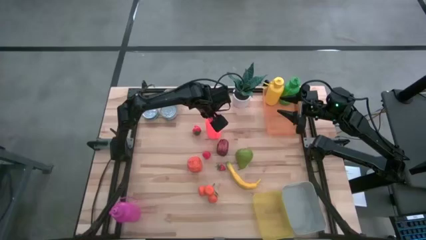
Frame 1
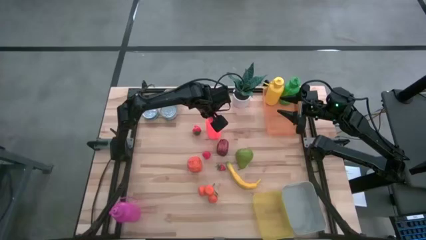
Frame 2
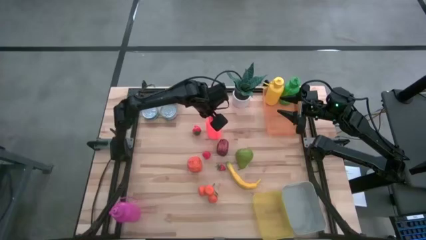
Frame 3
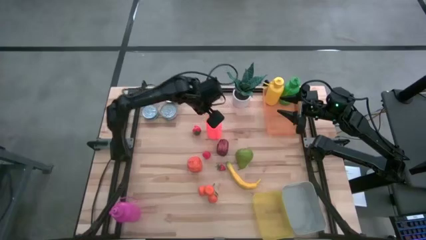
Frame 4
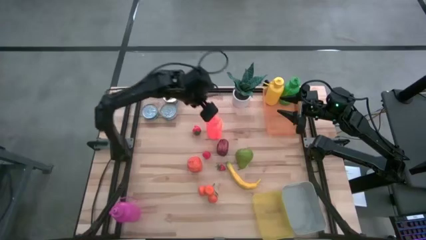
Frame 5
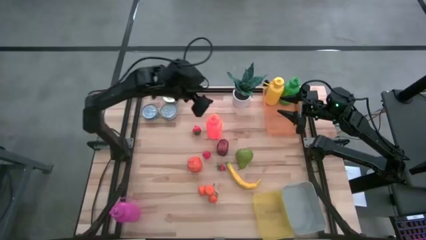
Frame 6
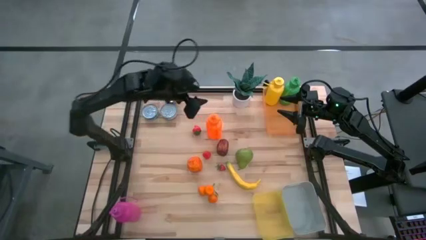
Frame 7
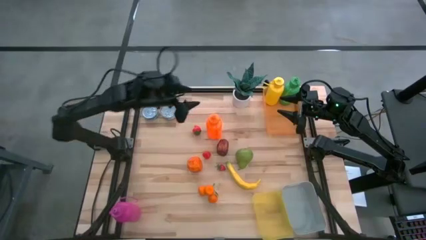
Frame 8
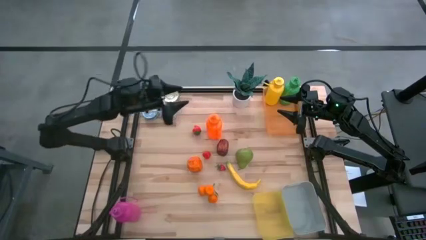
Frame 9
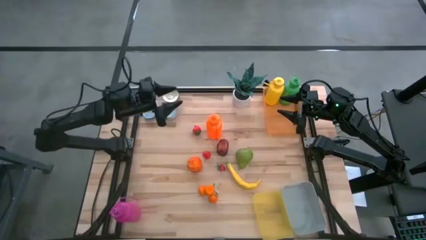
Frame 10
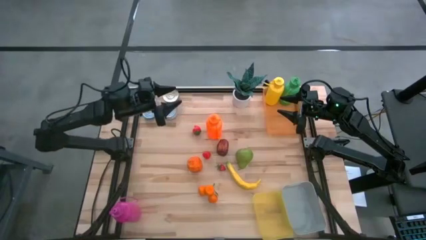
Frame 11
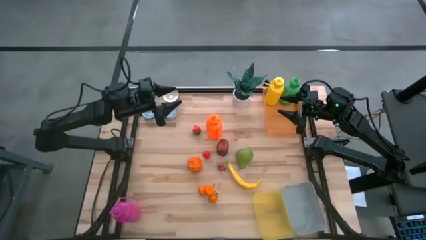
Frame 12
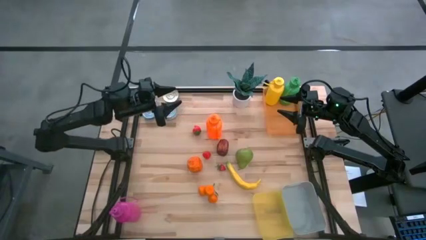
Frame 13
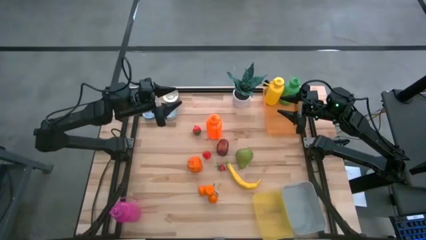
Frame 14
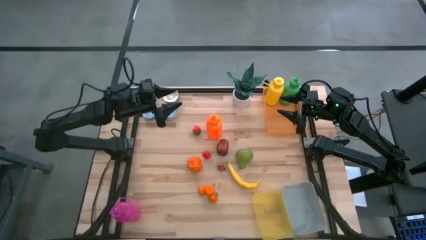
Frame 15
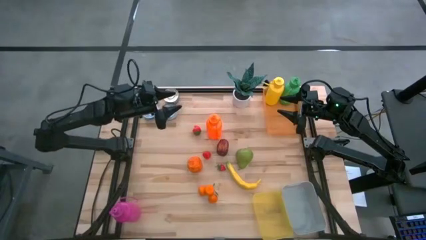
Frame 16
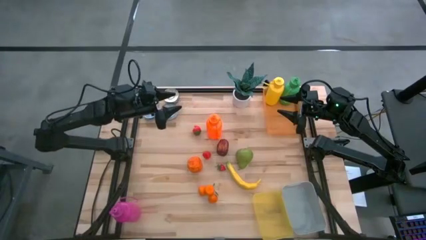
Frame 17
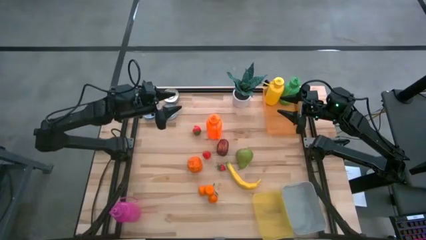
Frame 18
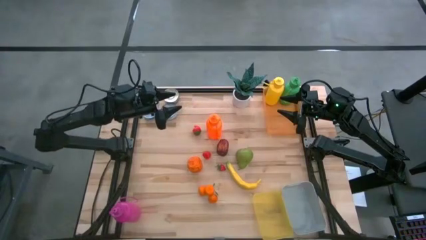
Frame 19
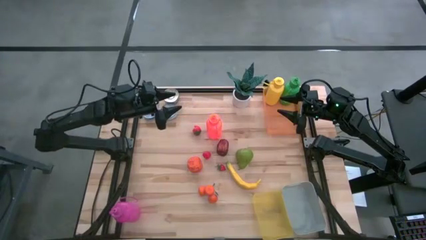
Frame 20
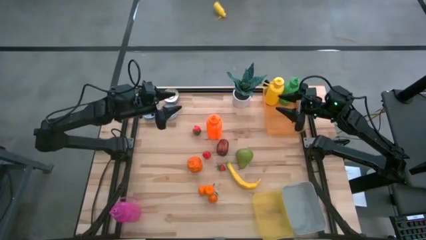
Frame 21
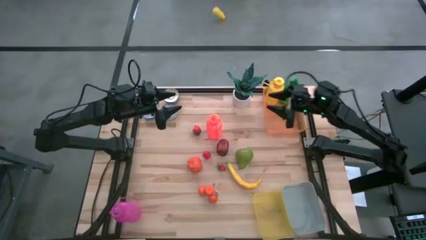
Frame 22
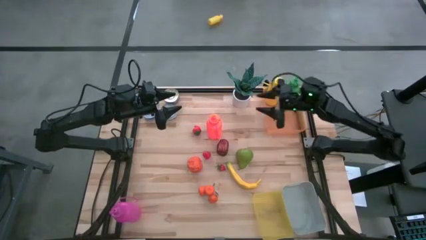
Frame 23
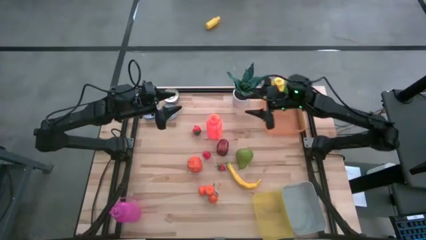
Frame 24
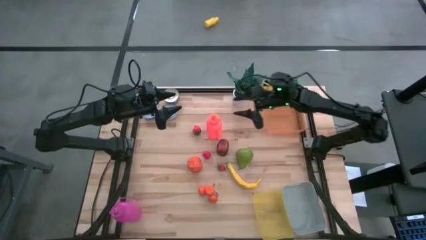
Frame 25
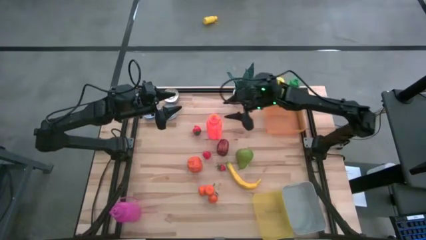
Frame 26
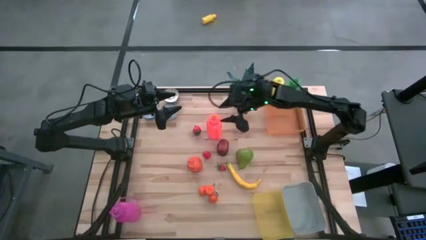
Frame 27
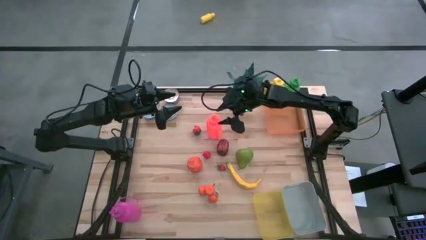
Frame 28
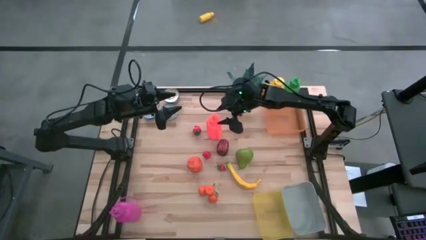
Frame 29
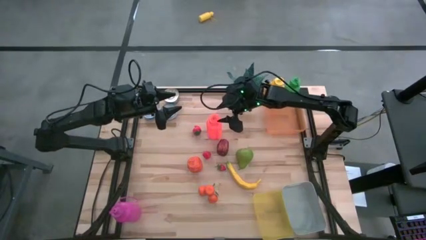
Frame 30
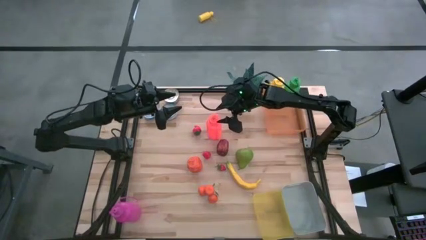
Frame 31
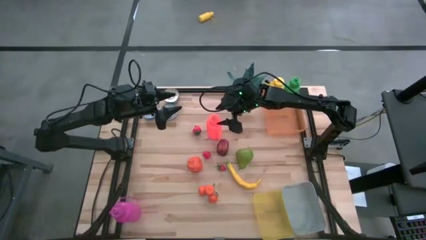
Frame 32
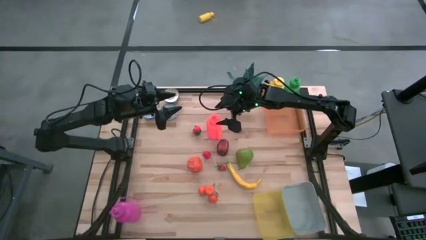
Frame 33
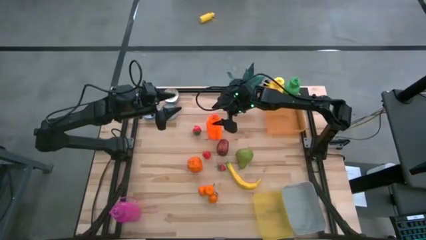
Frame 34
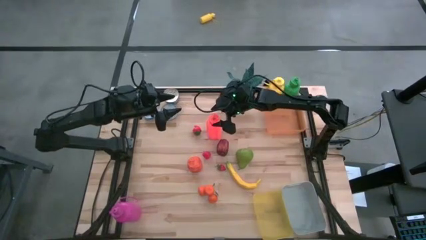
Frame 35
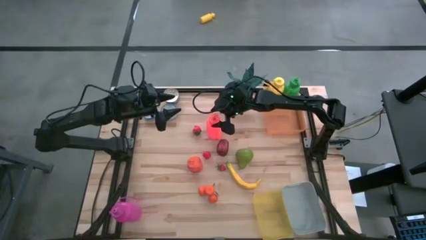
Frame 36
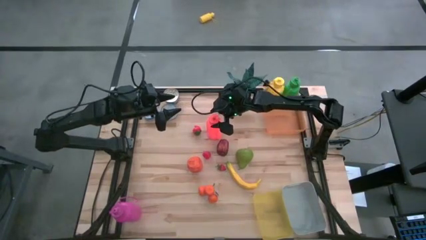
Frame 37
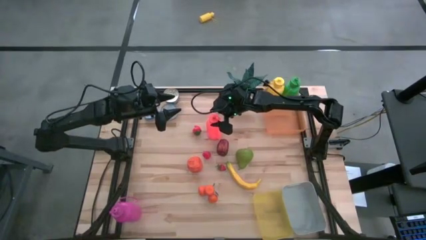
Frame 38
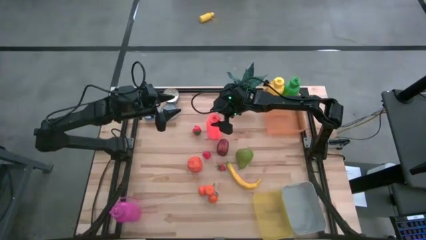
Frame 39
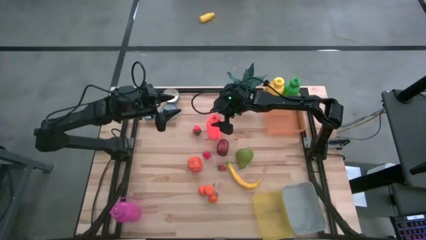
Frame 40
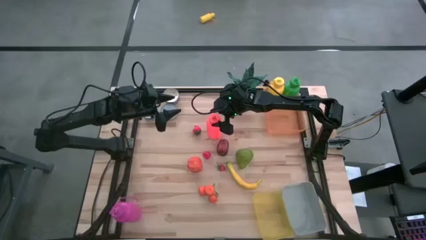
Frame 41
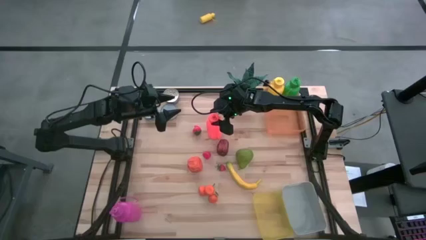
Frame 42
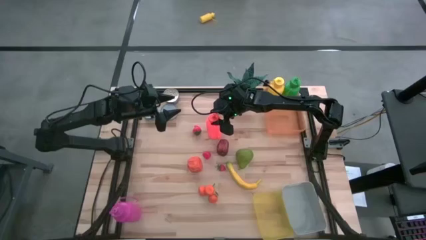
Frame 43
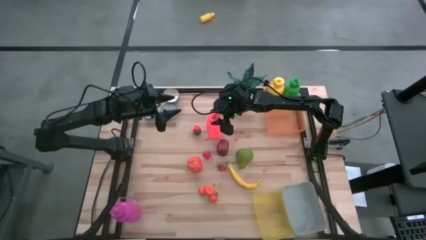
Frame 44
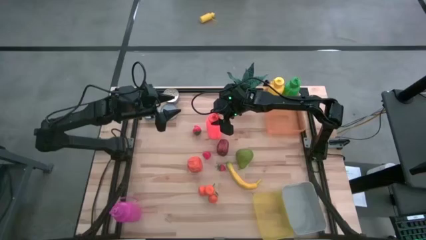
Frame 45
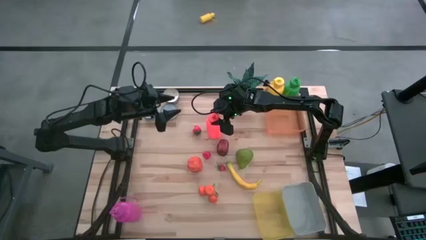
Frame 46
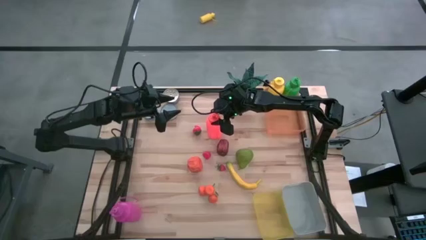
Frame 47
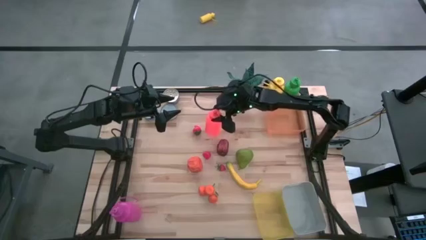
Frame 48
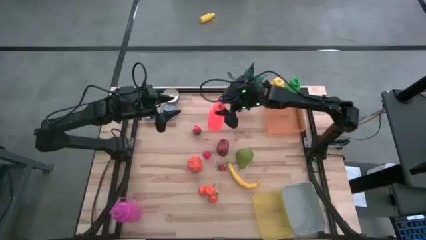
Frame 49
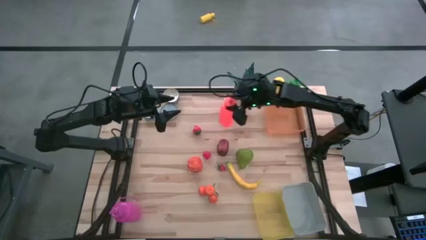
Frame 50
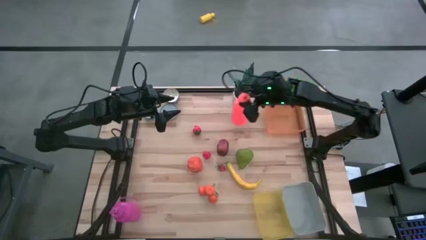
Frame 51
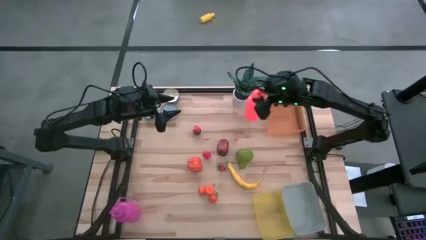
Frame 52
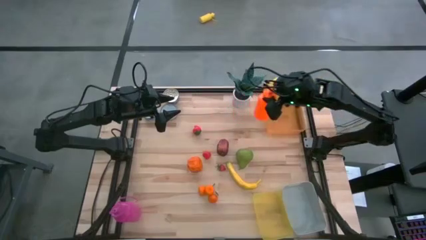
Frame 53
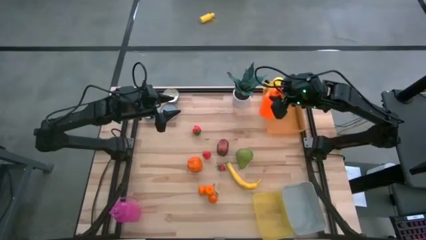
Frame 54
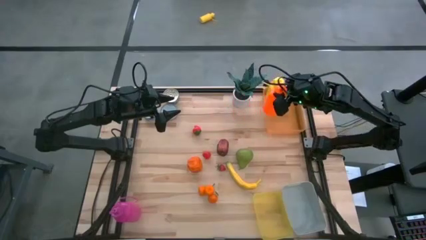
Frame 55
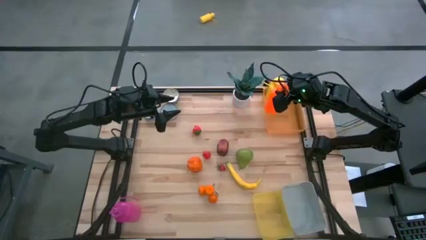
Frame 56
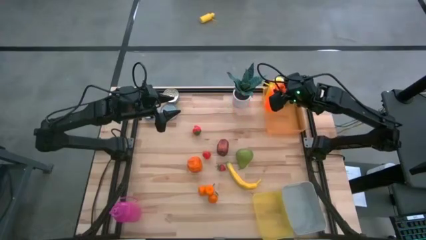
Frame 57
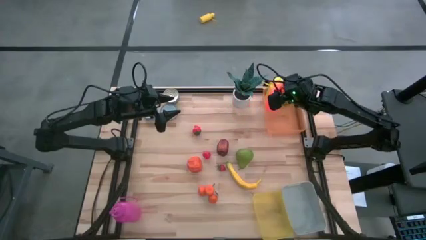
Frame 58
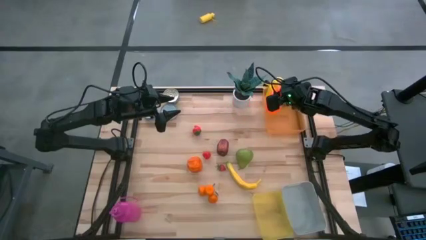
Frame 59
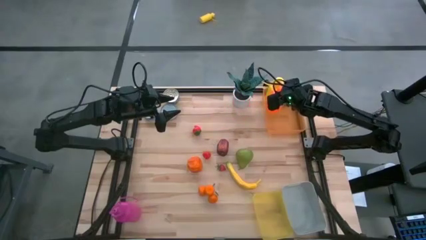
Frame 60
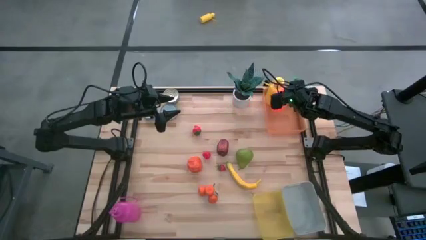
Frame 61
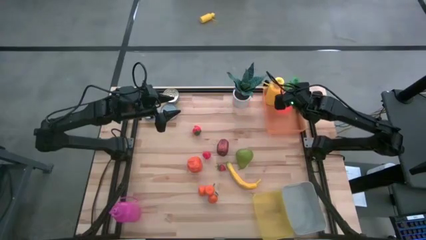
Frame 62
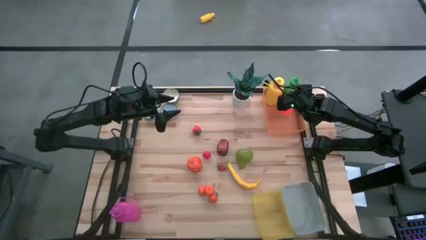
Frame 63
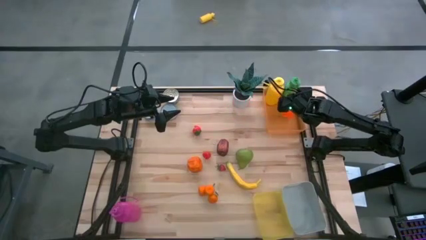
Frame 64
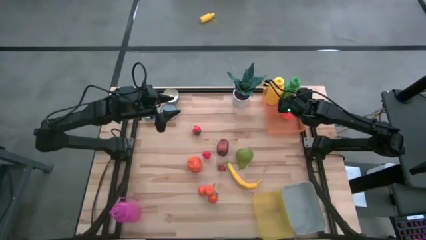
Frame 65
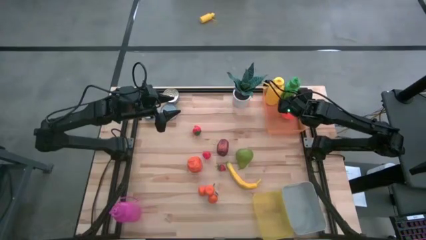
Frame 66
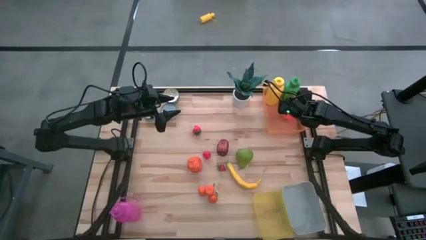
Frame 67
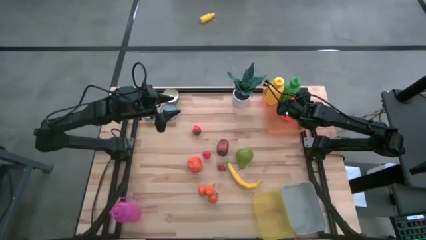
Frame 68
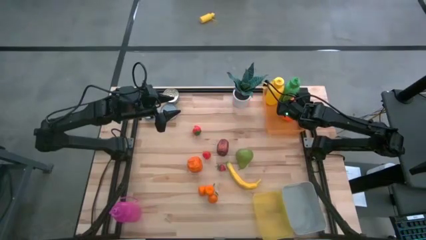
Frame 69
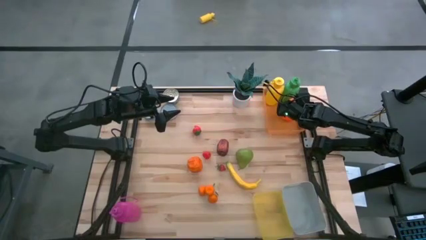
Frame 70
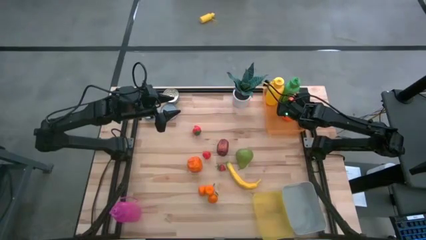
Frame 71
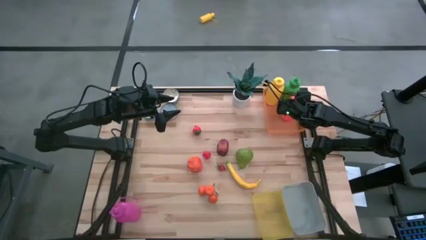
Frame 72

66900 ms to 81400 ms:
Task: Pick & Place Food Item
Put the orange water bottle into the orange bin
